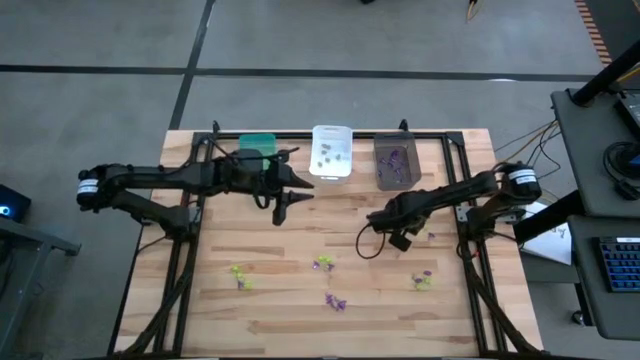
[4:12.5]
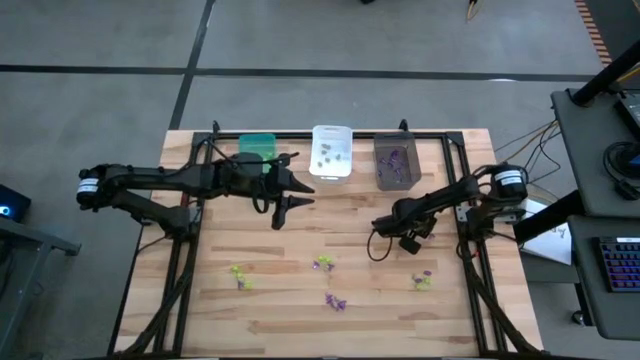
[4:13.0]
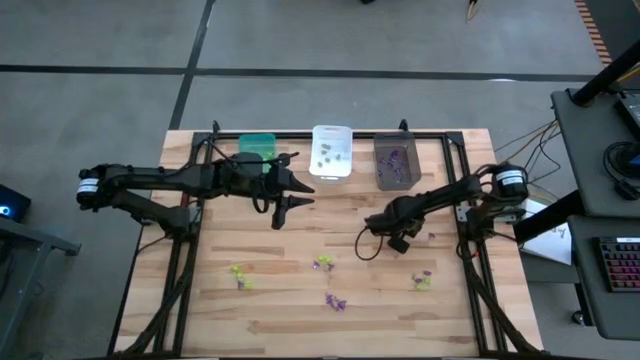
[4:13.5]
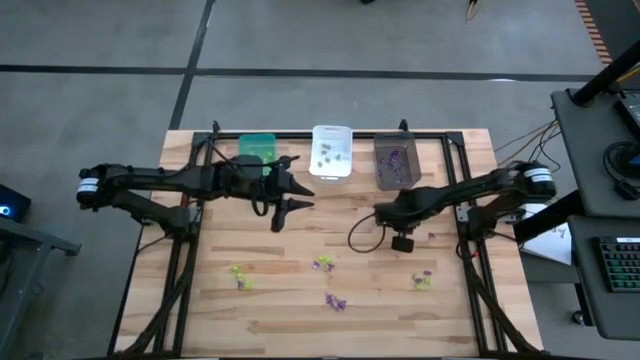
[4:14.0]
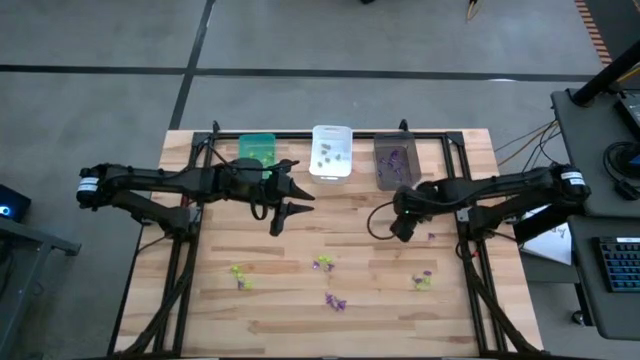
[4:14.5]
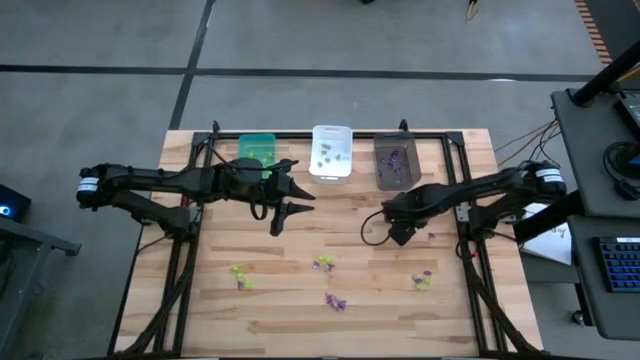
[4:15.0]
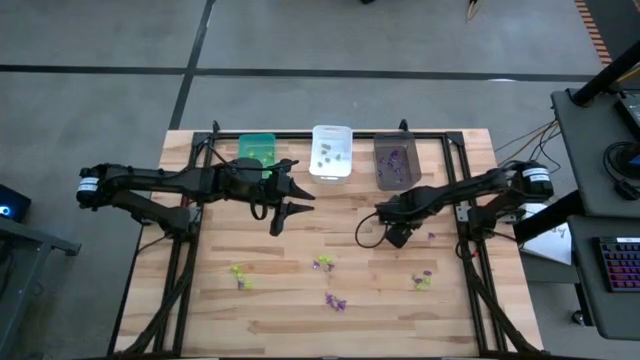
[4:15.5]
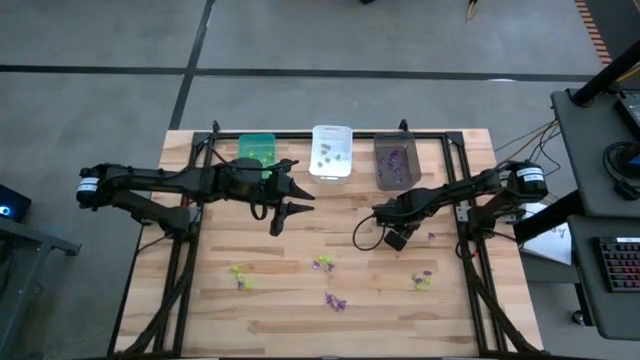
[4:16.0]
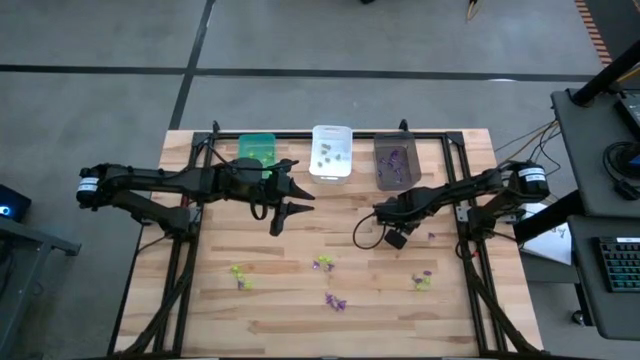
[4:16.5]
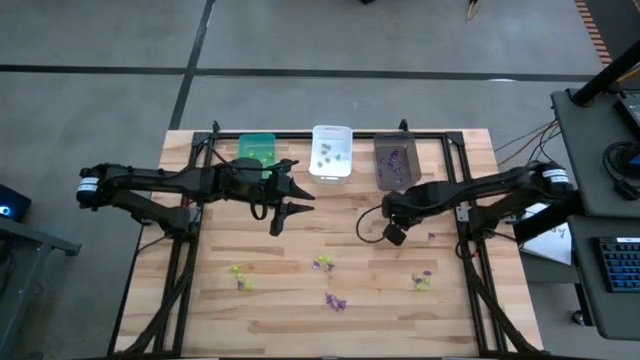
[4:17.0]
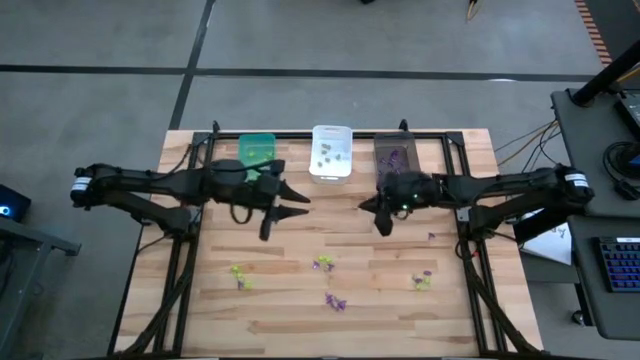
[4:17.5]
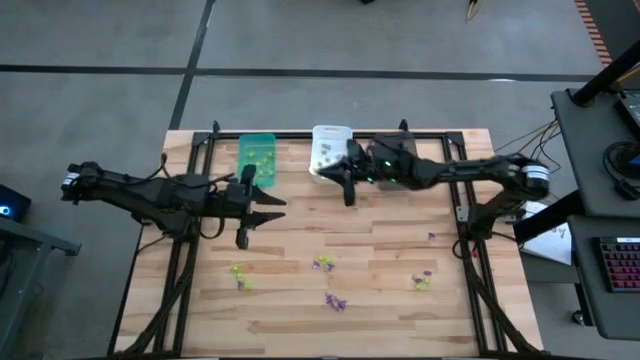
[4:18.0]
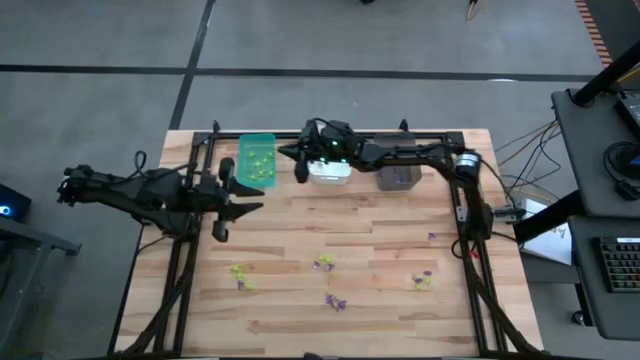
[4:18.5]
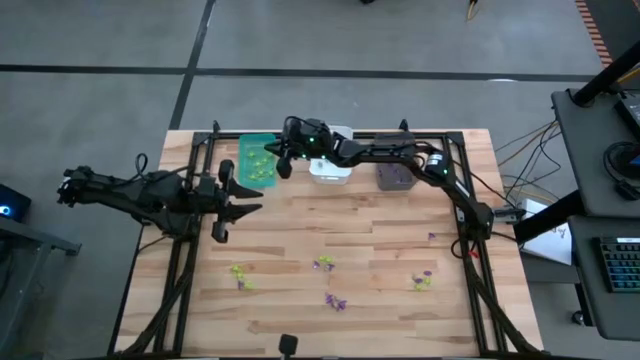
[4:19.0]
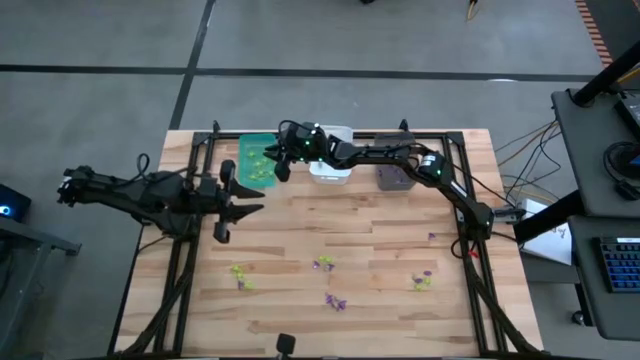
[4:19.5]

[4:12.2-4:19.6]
Task: Sort Halloween decoration
Put the green spider toy into the blue bin

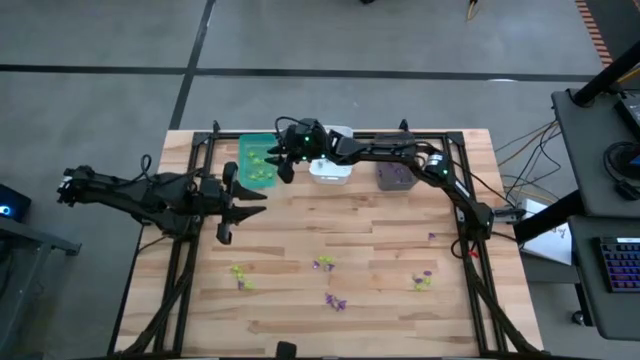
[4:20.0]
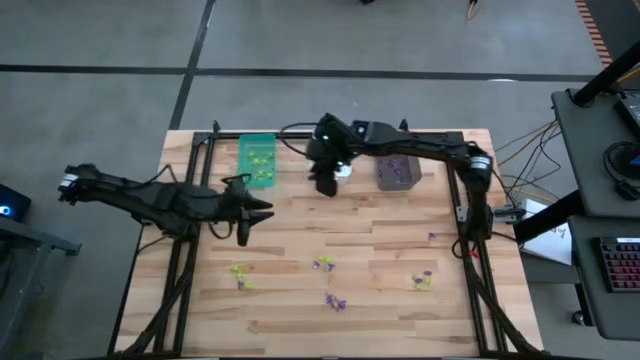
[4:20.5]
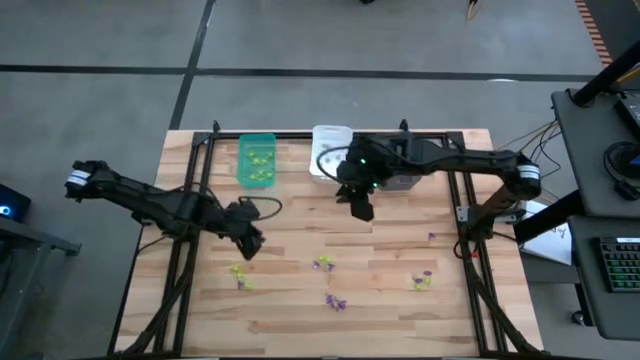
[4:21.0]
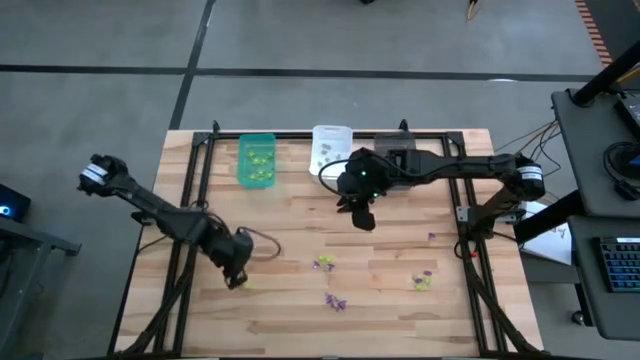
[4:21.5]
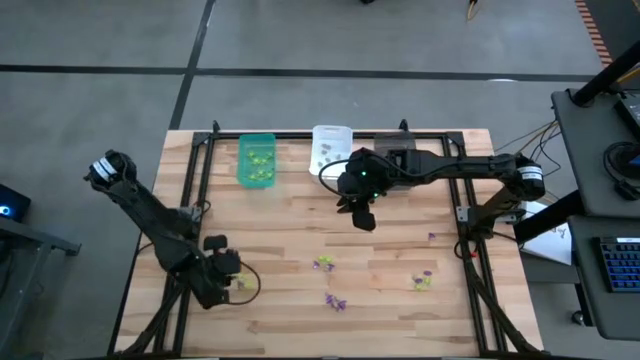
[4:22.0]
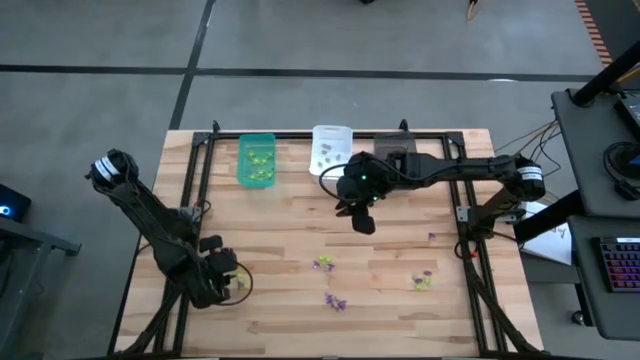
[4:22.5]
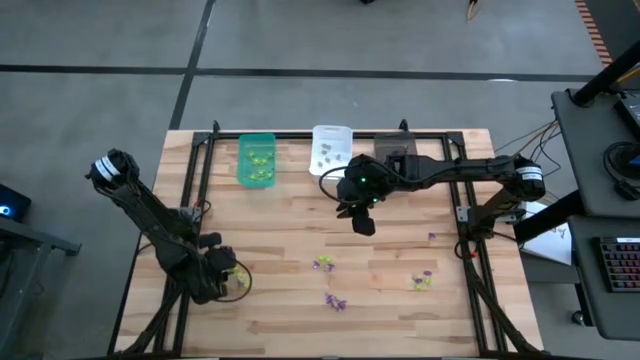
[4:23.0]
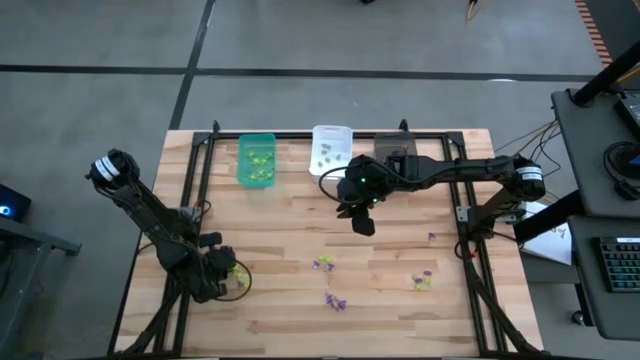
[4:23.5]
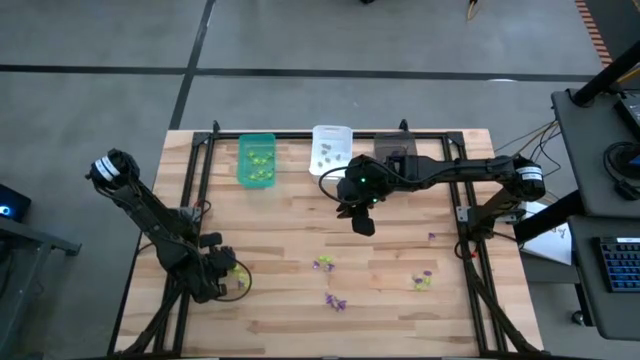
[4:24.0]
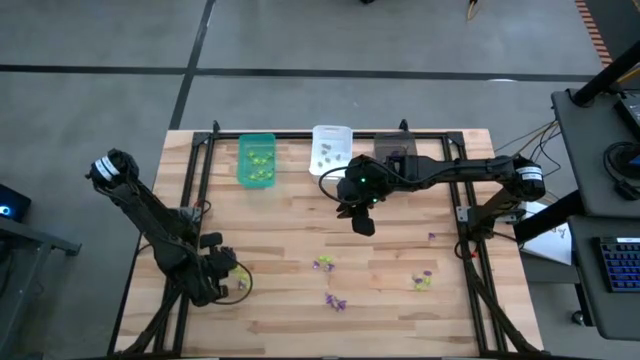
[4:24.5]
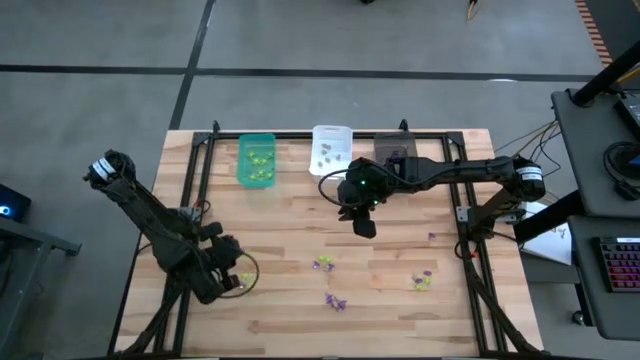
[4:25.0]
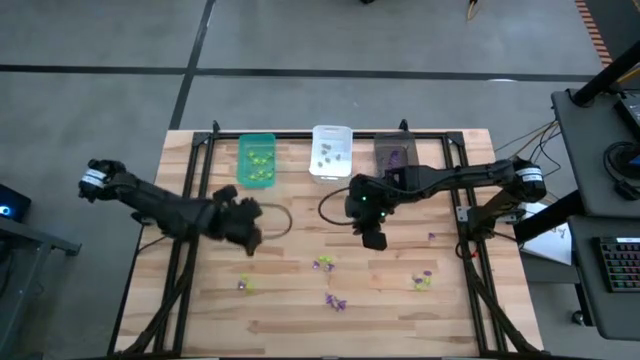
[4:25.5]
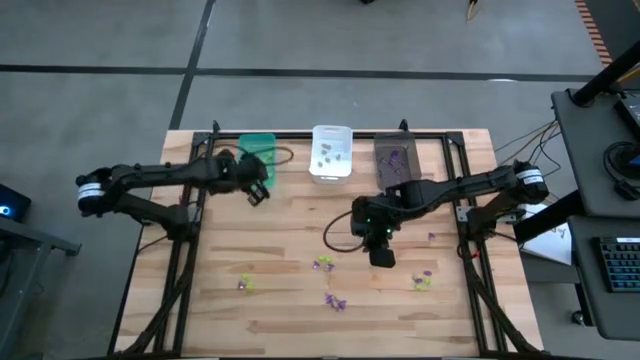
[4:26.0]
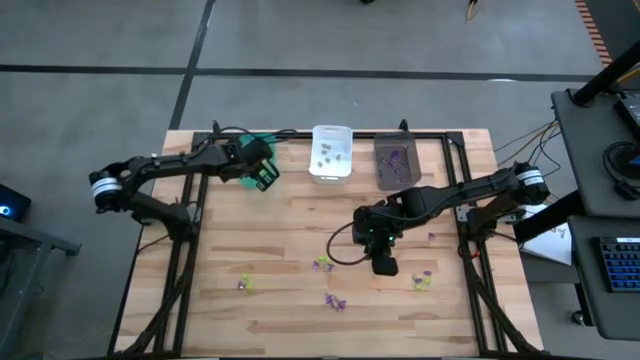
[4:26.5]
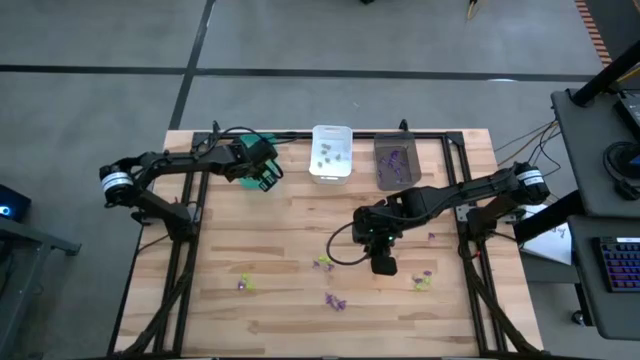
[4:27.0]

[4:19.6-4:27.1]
Put the green spider toy into the blue bin

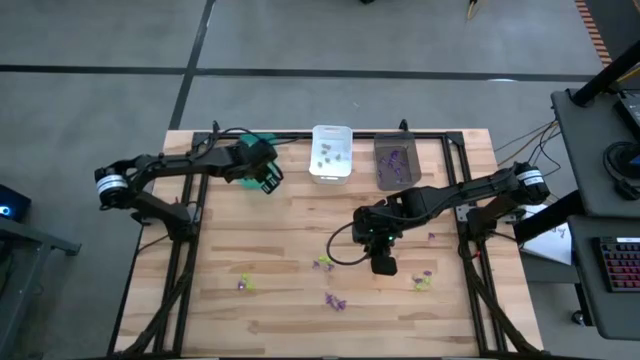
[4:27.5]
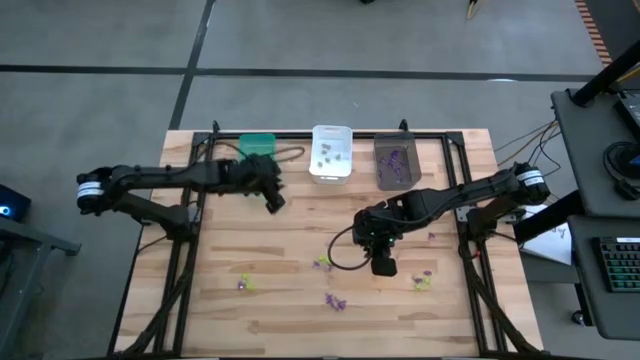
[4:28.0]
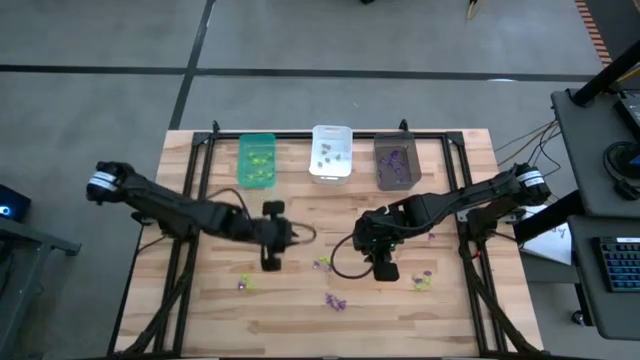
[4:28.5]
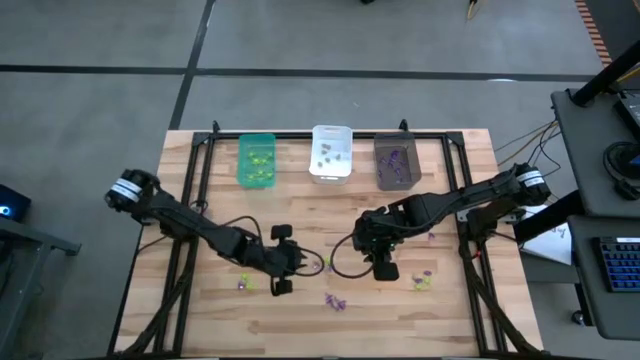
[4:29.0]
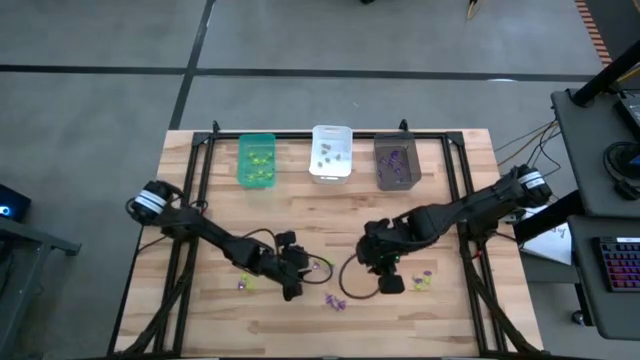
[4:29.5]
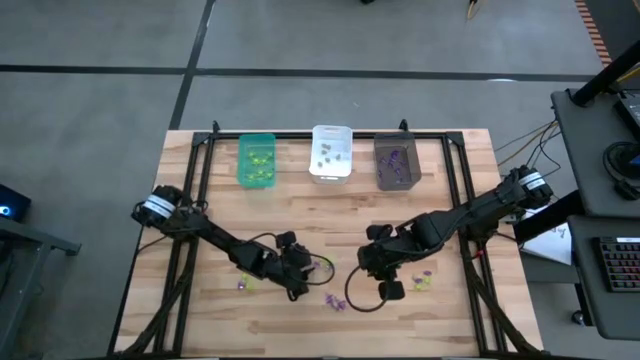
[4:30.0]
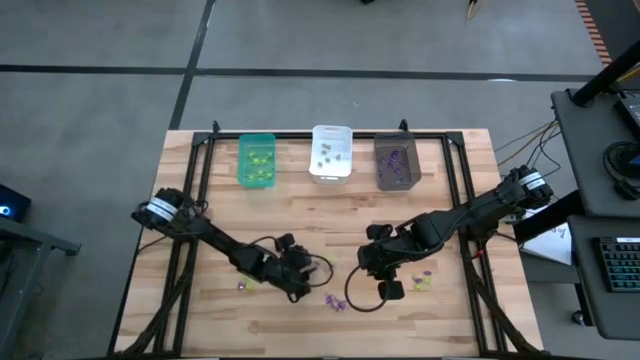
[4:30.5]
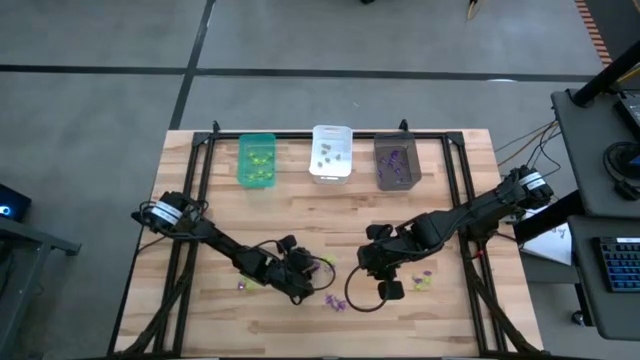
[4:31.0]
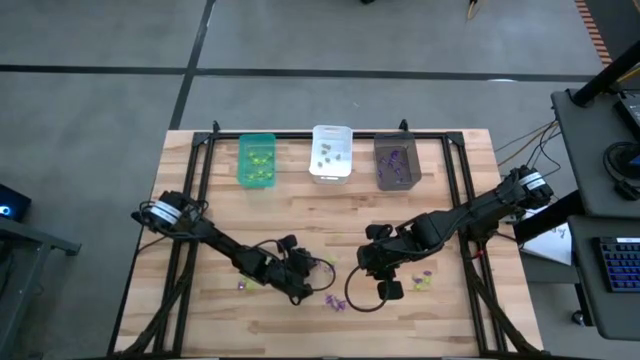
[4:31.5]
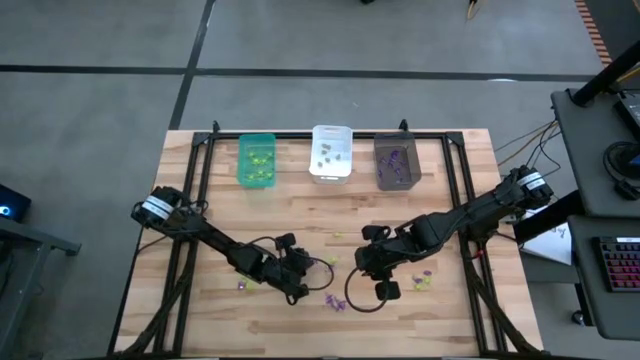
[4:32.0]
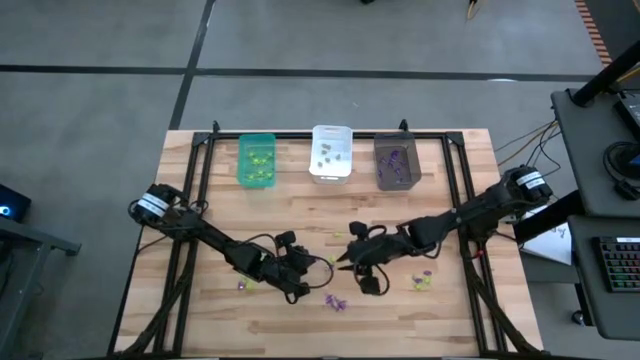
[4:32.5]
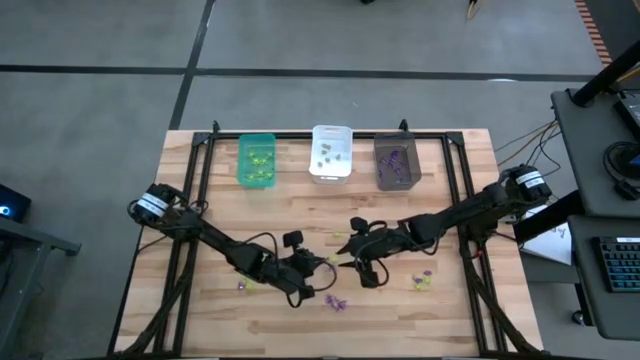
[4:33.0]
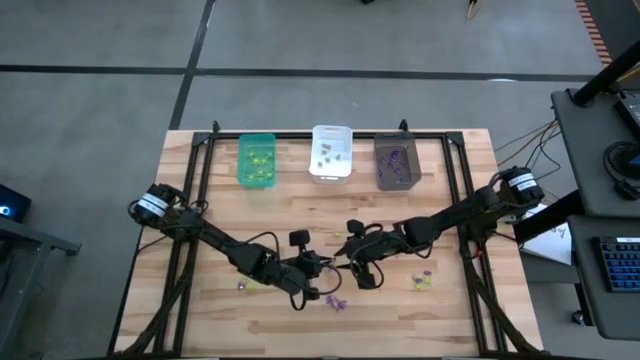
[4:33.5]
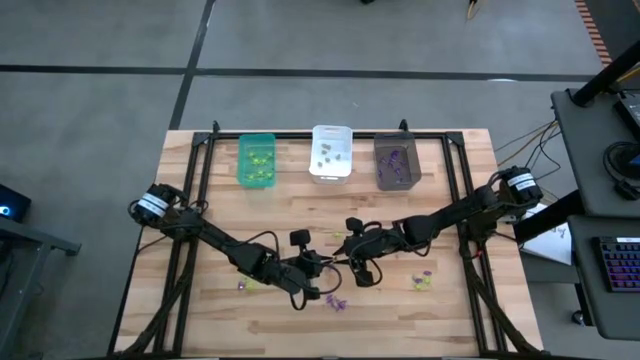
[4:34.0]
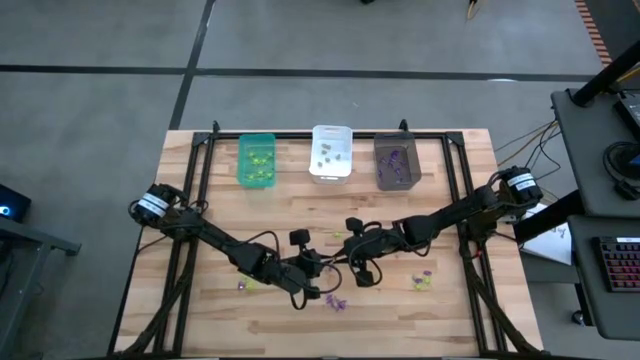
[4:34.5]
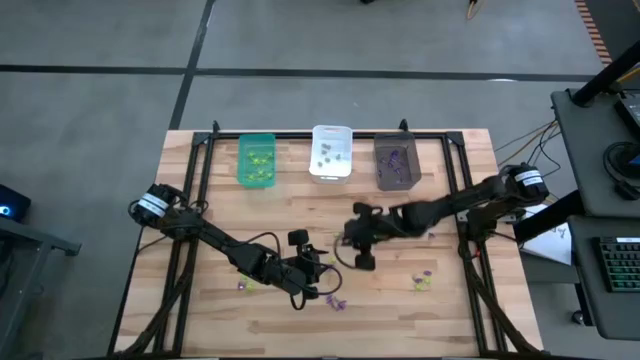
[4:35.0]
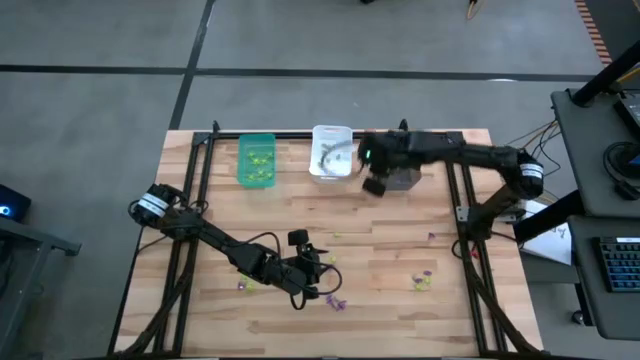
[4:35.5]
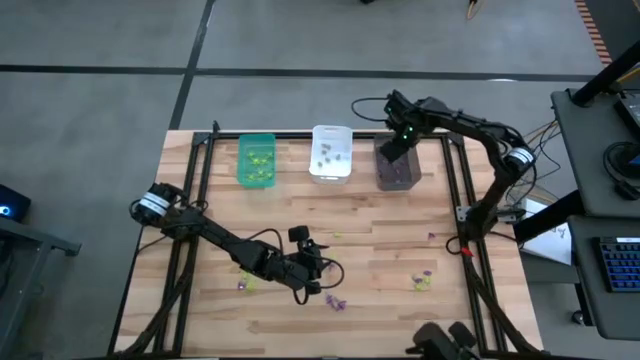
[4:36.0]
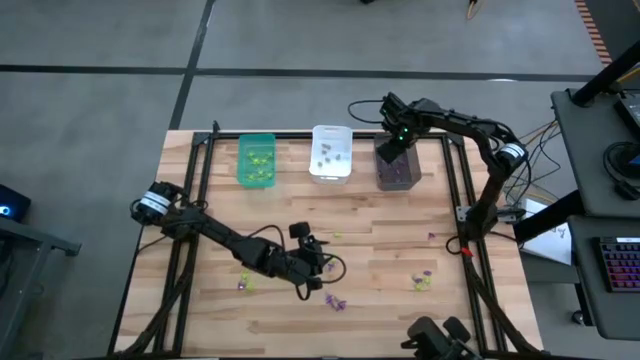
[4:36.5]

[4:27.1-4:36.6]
Put the purple witch hat toy into the gray bin
